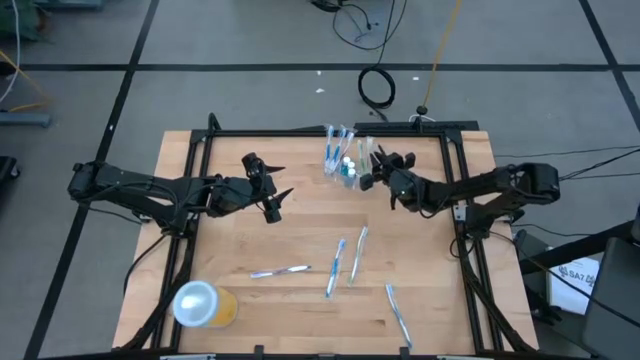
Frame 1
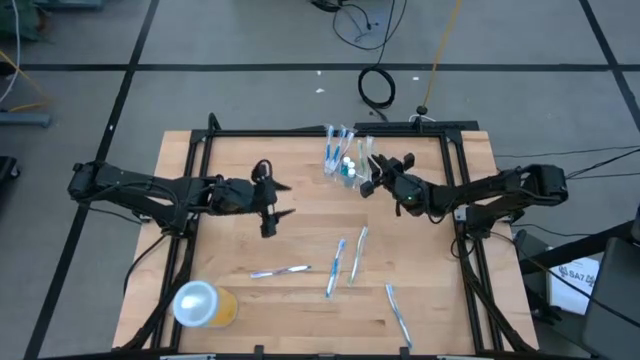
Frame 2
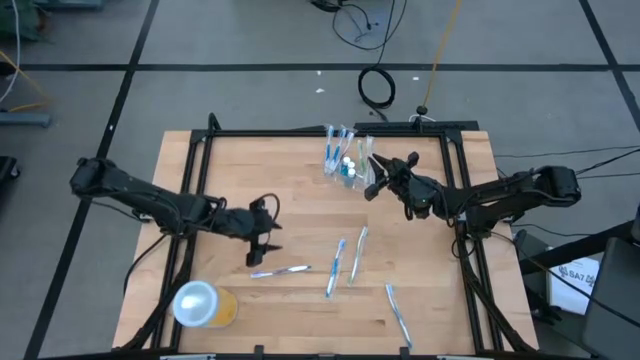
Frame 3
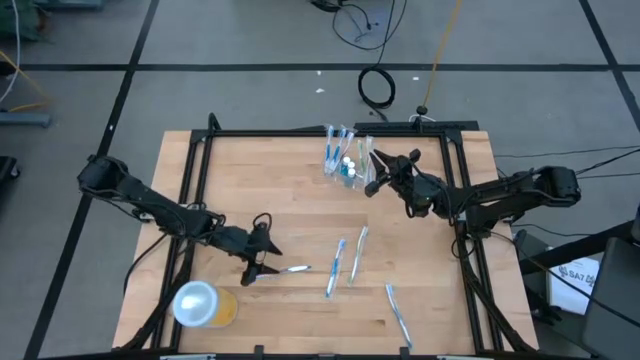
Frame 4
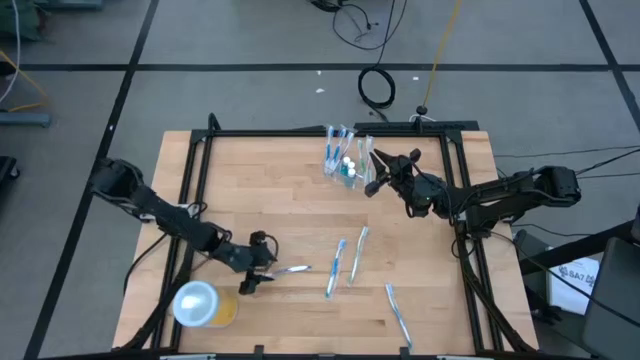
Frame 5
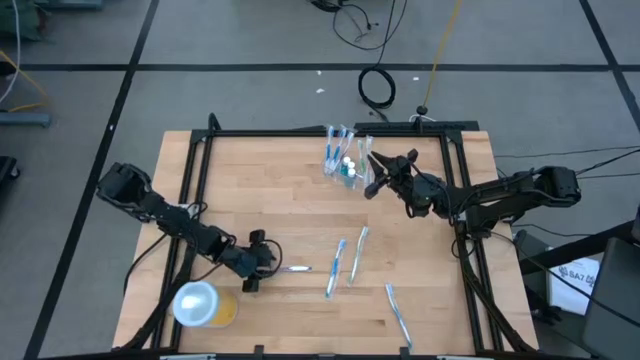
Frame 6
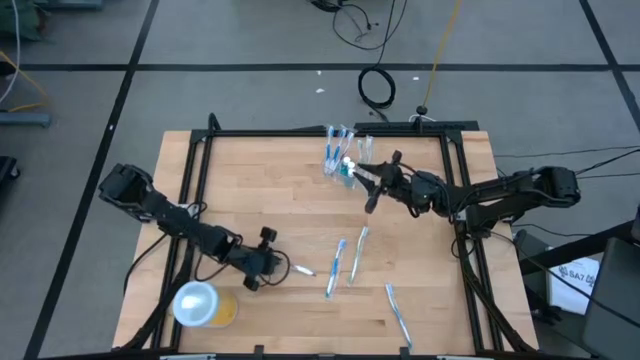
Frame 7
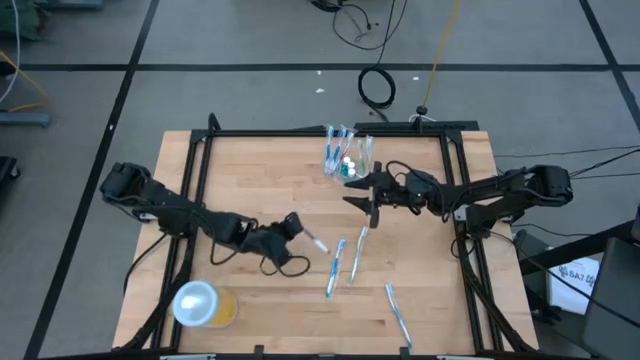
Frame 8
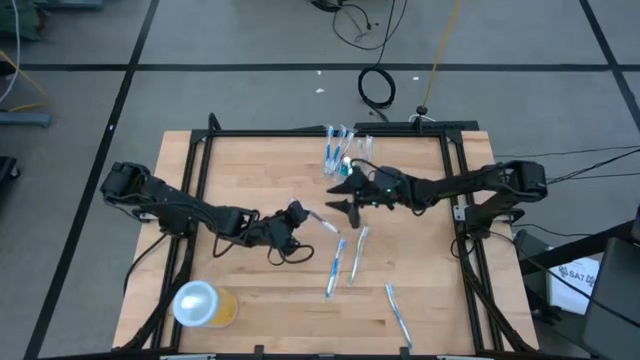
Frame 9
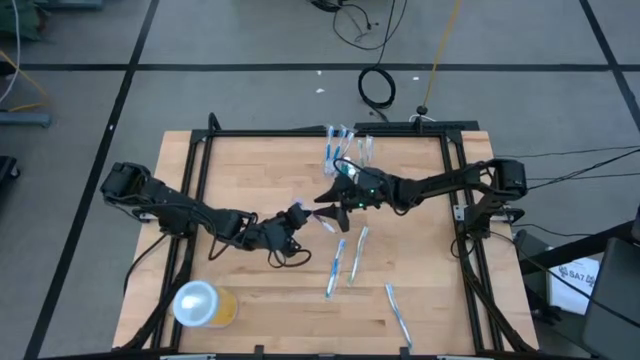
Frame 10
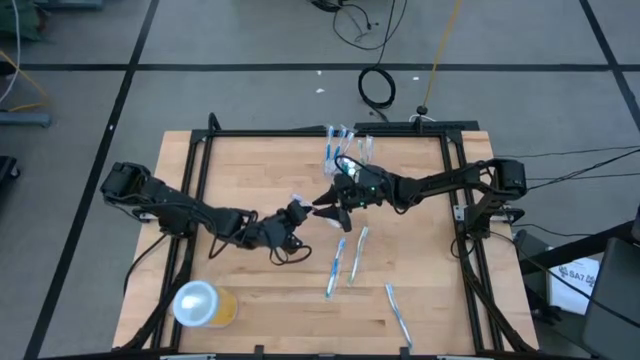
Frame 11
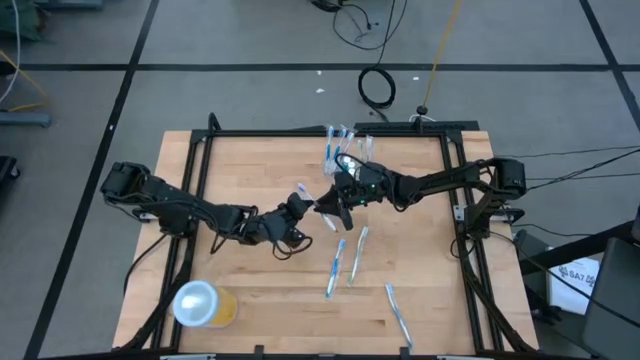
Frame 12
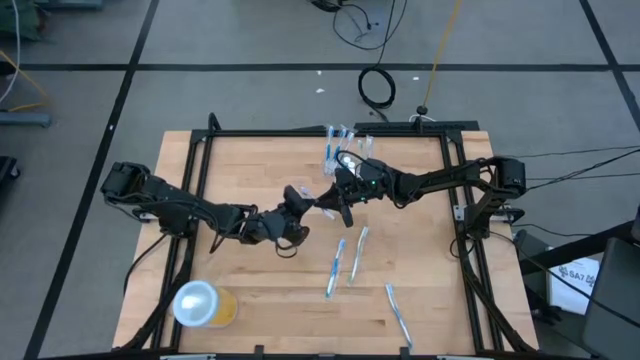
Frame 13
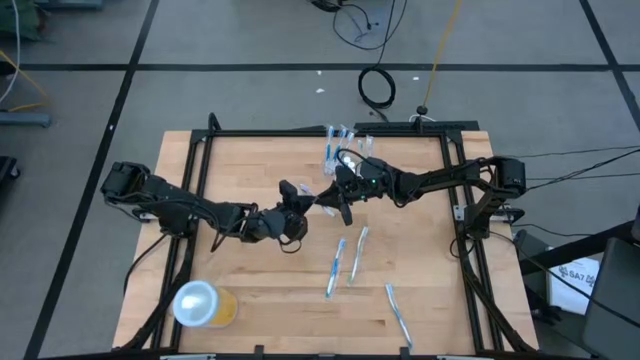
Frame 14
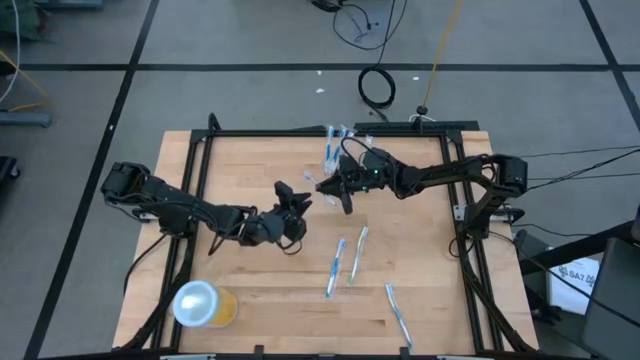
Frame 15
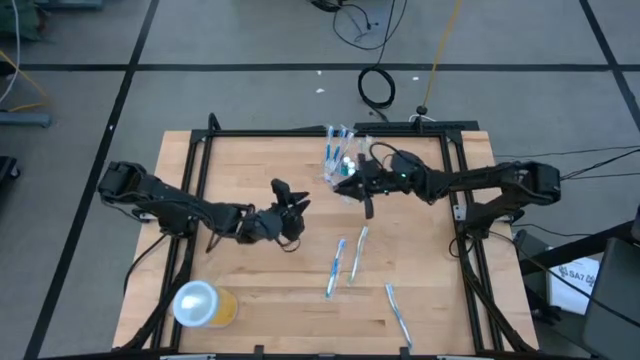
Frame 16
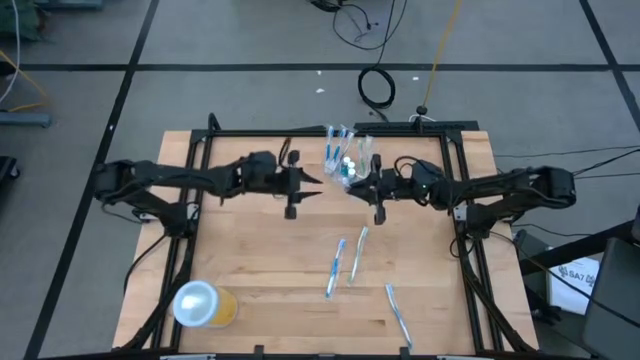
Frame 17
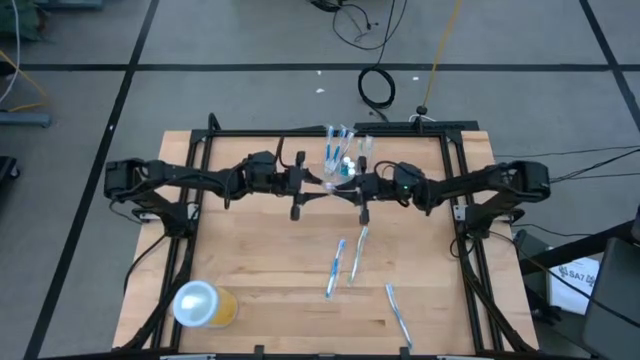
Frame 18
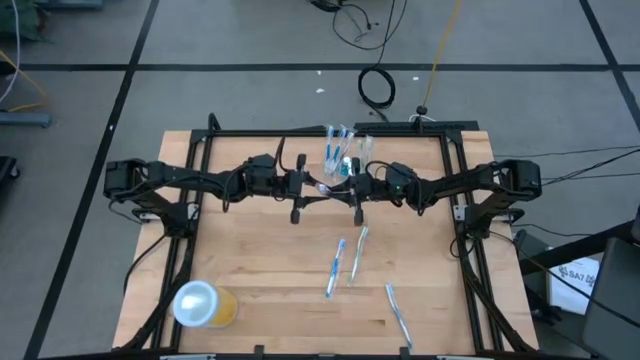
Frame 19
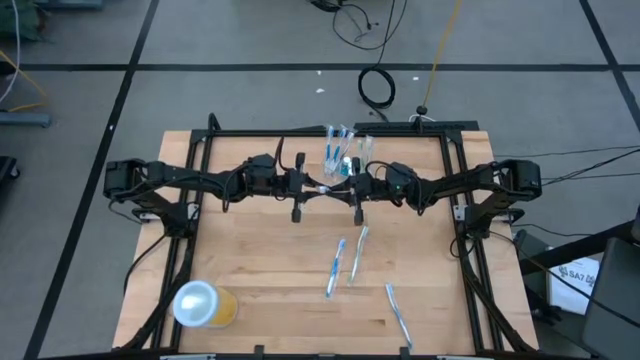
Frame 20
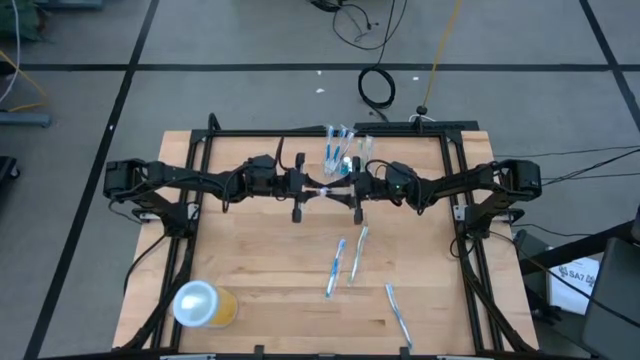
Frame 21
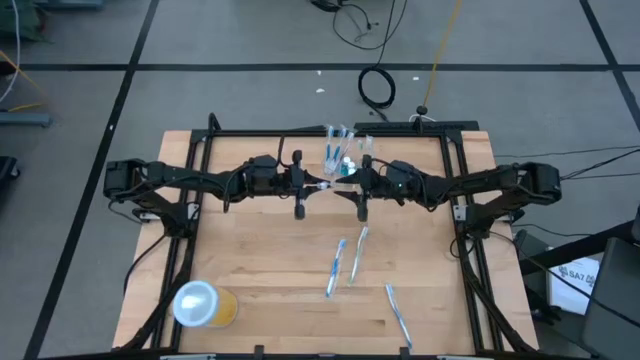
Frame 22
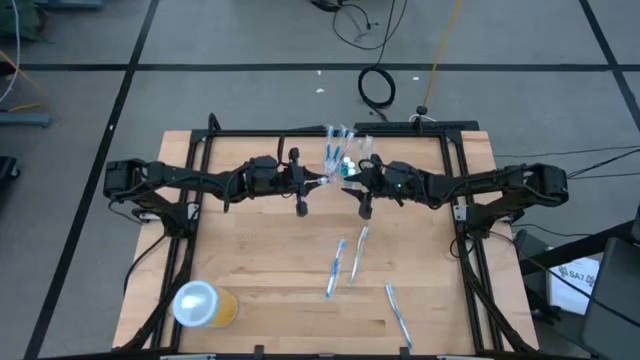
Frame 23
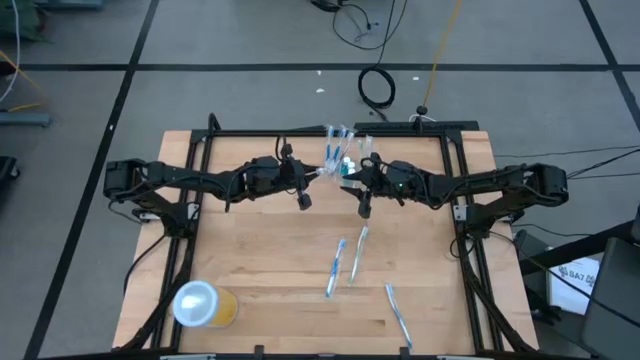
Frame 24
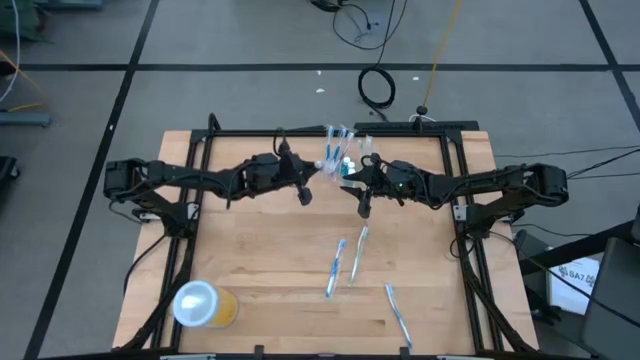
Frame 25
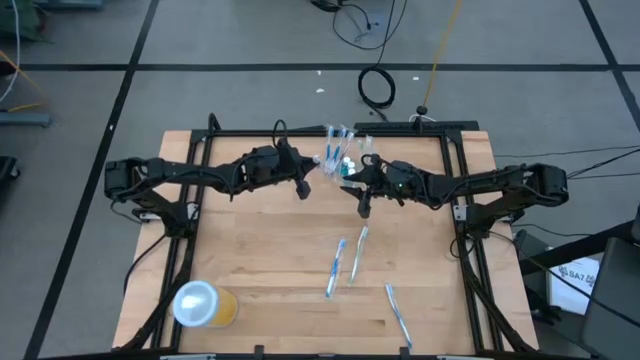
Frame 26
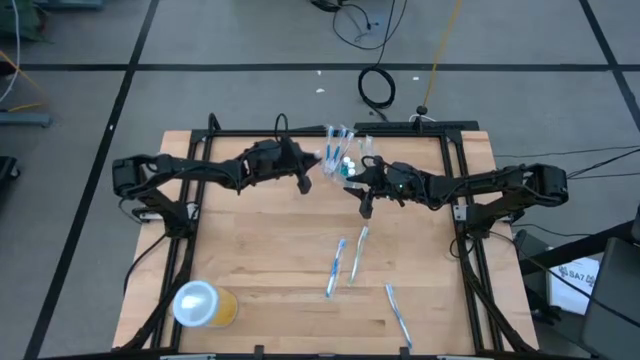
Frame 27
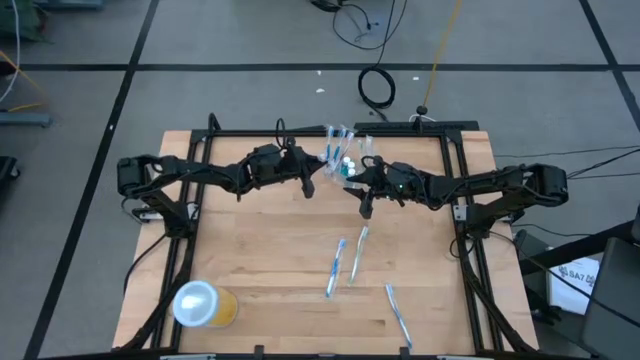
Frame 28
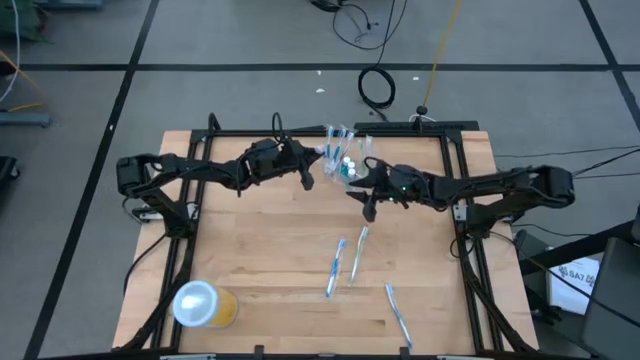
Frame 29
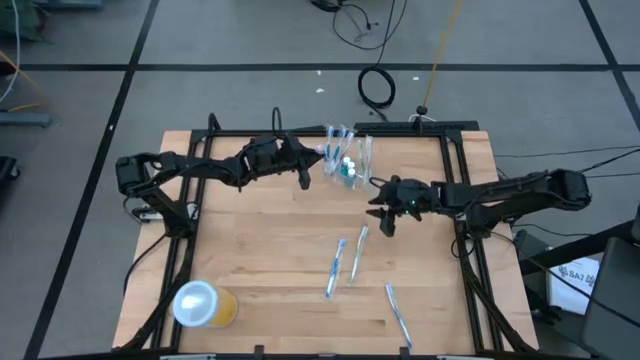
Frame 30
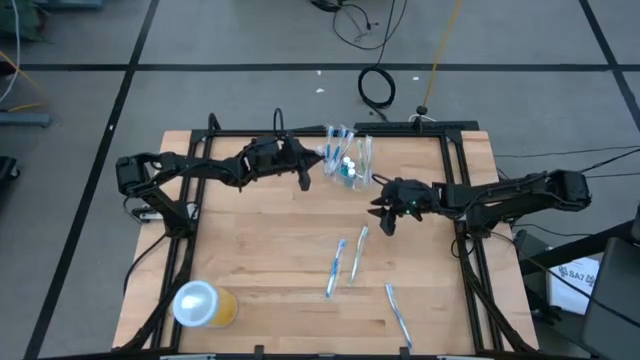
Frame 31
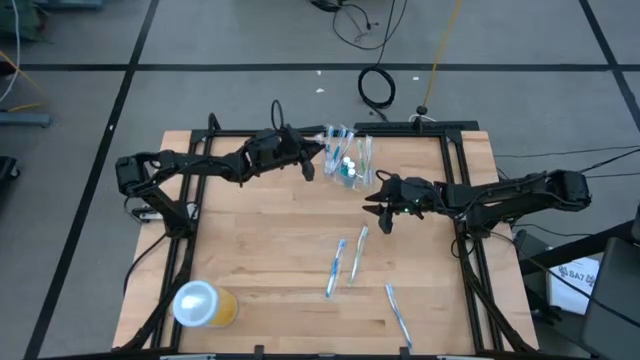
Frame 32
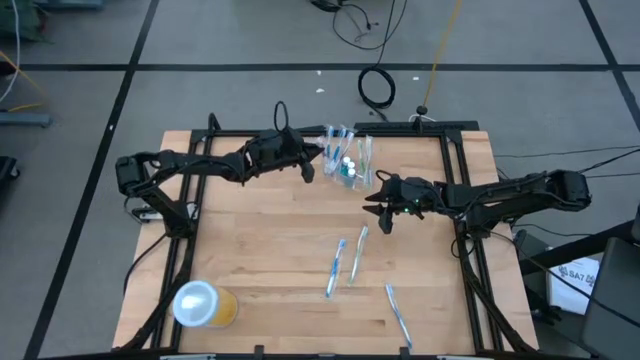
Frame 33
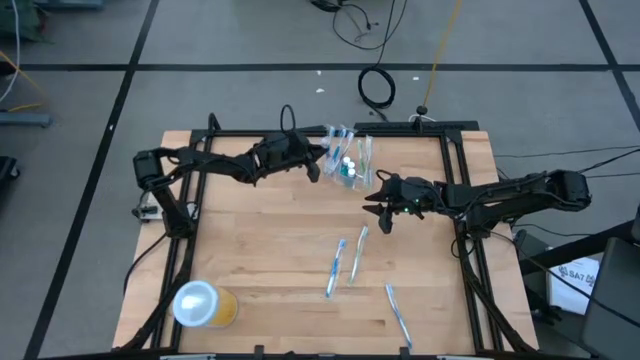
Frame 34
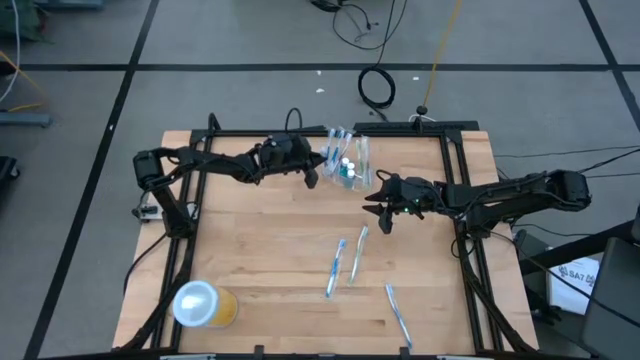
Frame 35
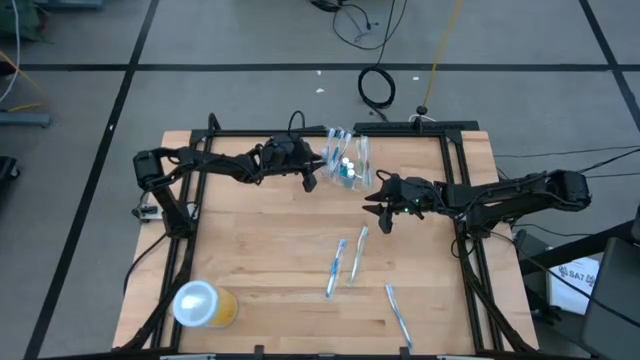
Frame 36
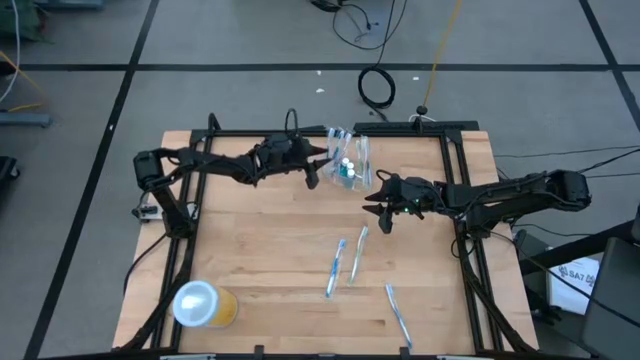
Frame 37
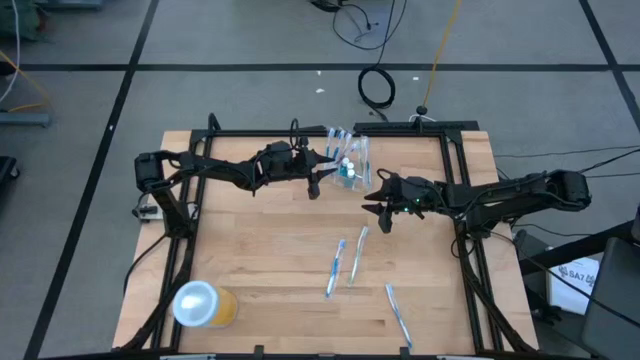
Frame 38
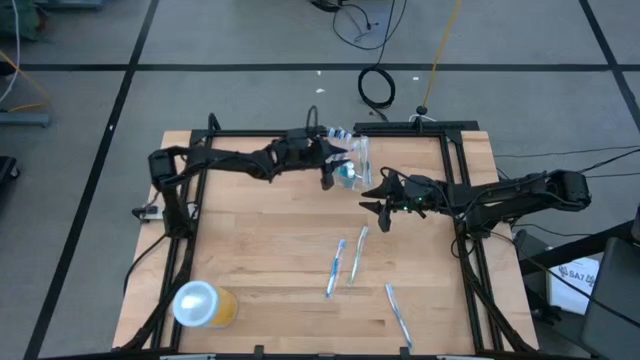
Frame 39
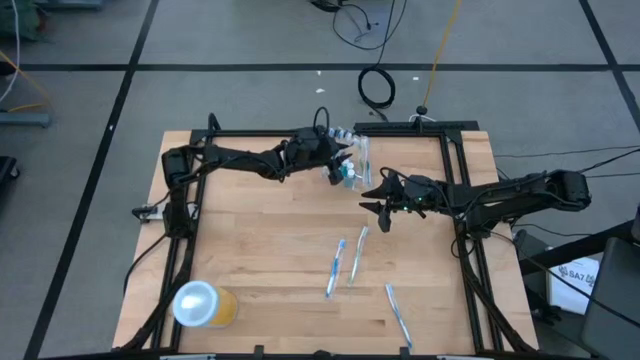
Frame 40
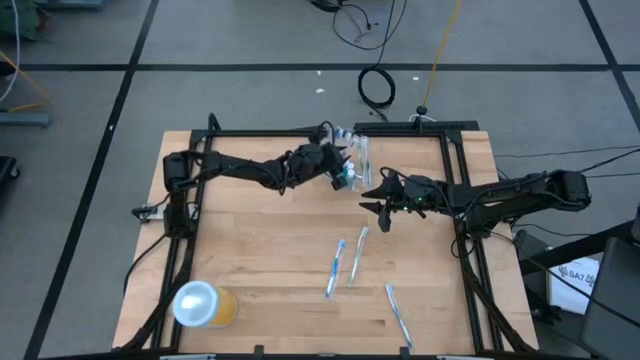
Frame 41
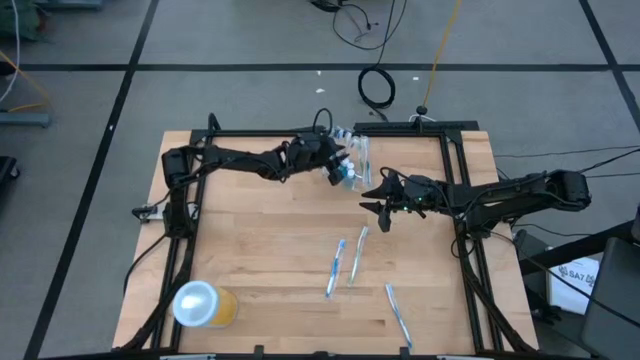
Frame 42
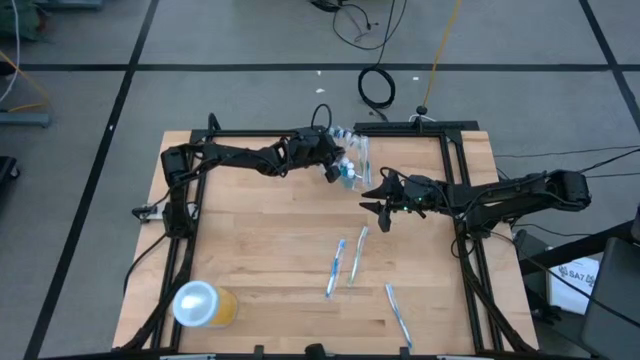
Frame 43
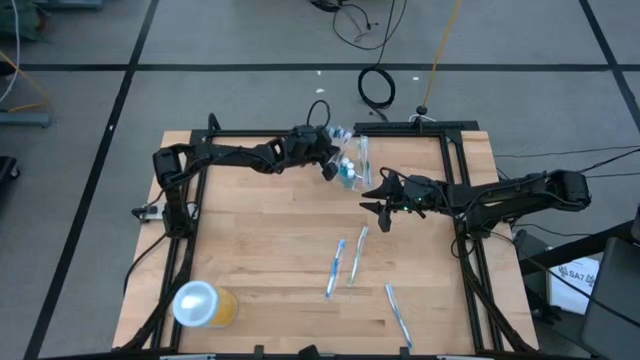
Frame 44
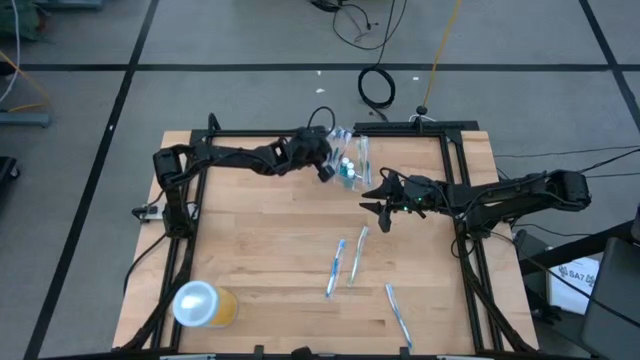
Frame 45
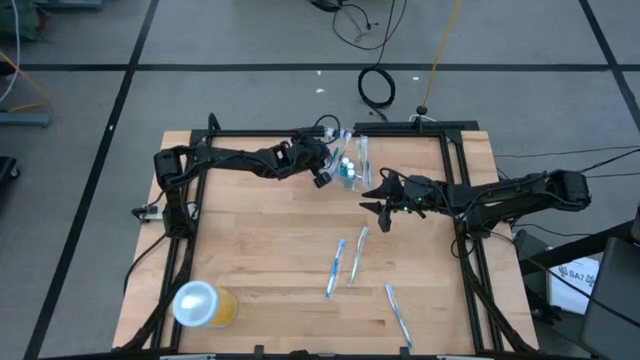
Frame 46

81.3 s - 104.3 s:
Task: Pick & Place toothbrushing station
Put the violet toothbrush into the transparent organizer
